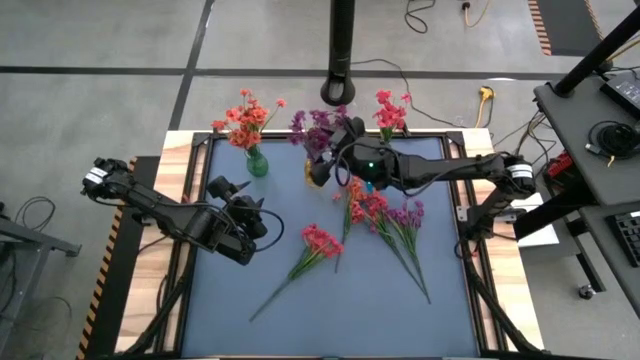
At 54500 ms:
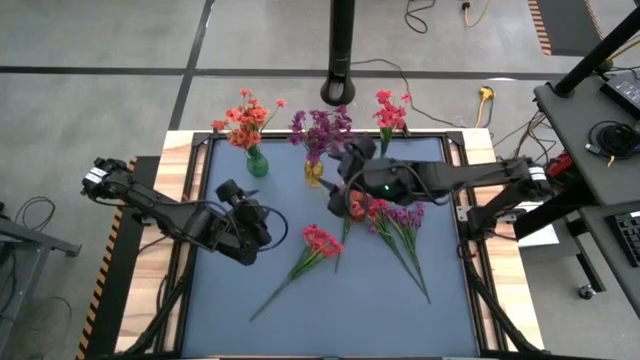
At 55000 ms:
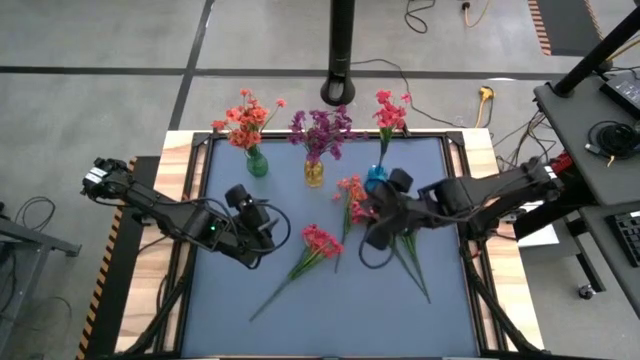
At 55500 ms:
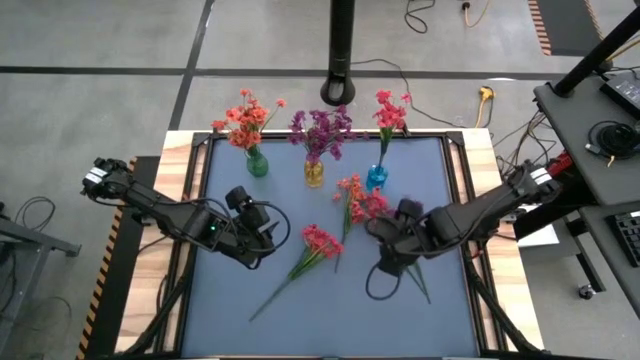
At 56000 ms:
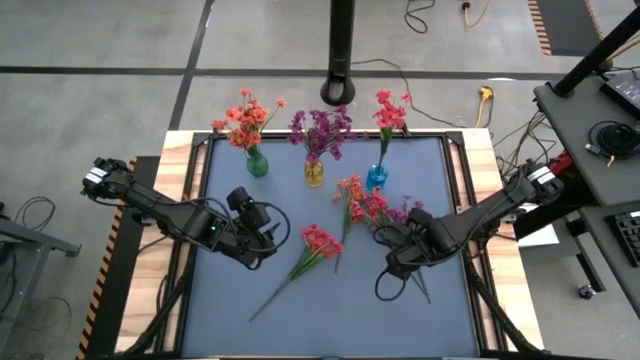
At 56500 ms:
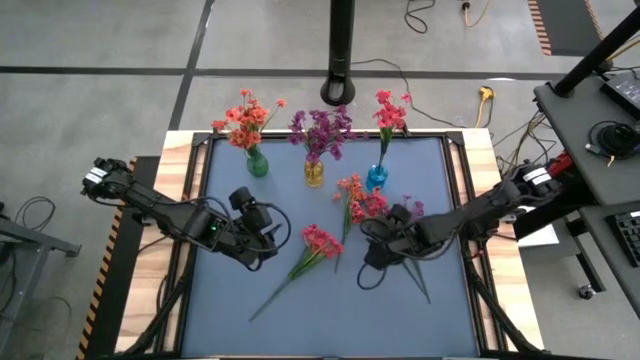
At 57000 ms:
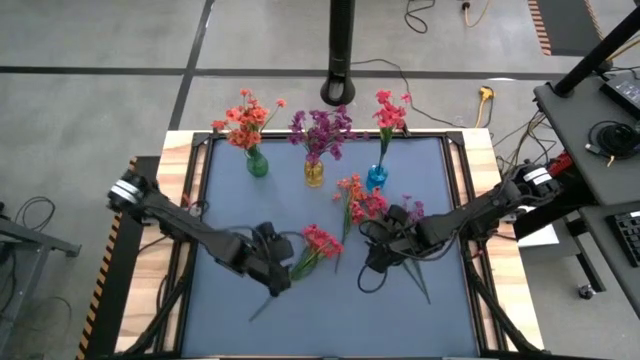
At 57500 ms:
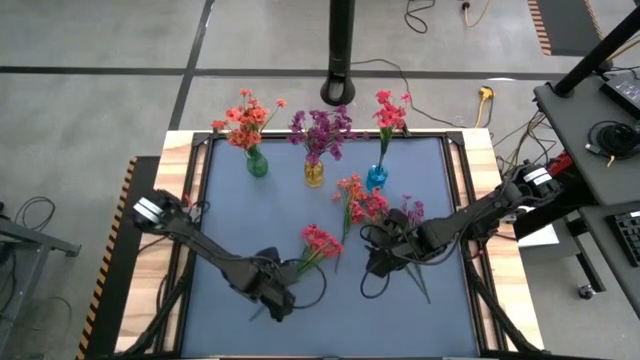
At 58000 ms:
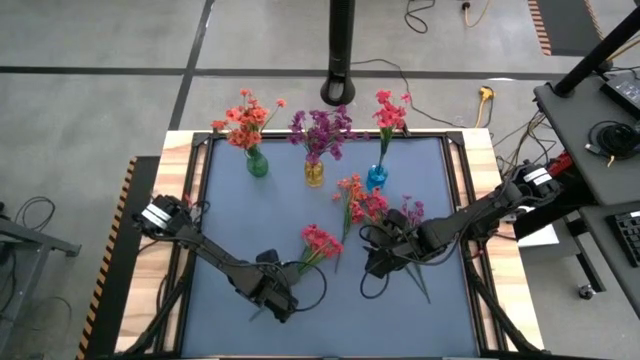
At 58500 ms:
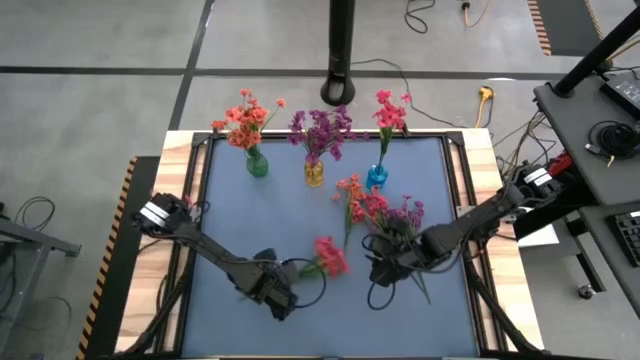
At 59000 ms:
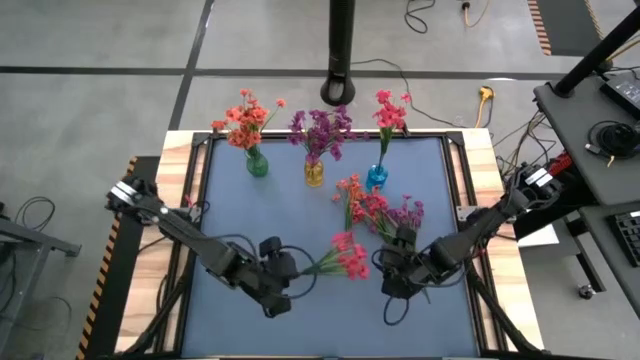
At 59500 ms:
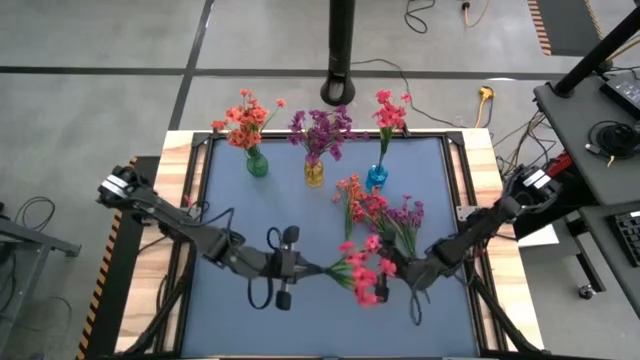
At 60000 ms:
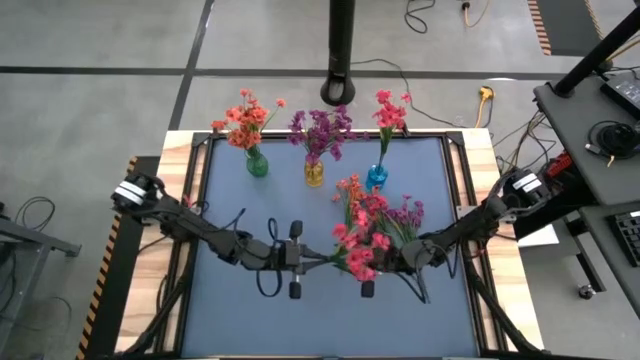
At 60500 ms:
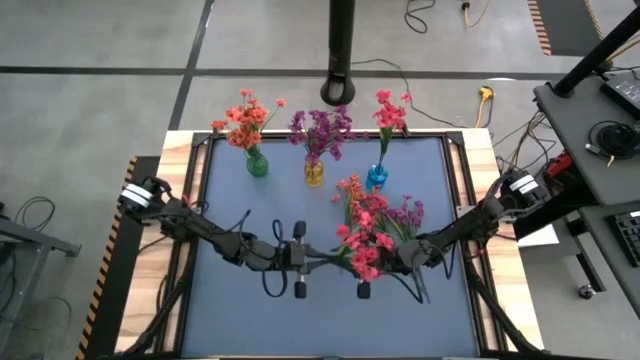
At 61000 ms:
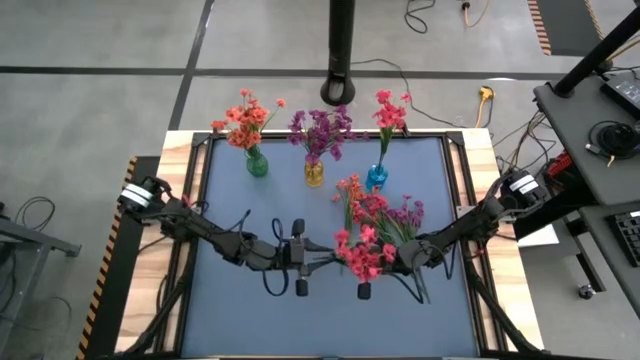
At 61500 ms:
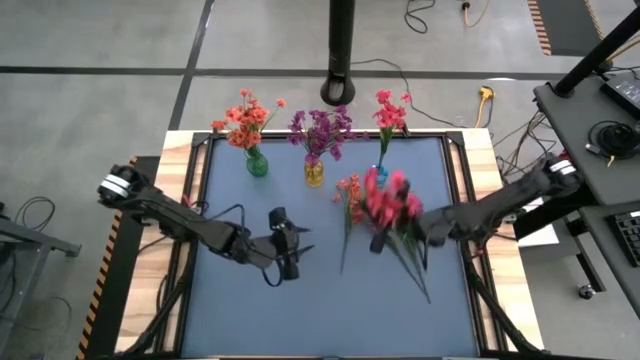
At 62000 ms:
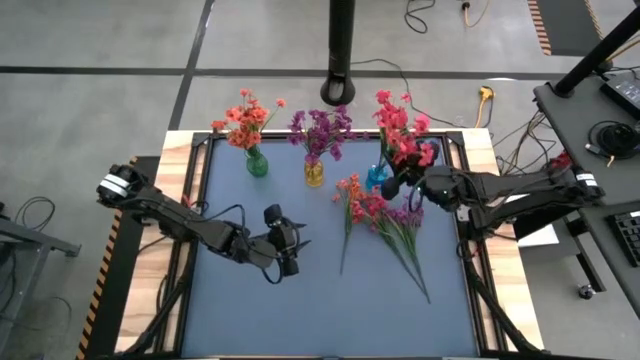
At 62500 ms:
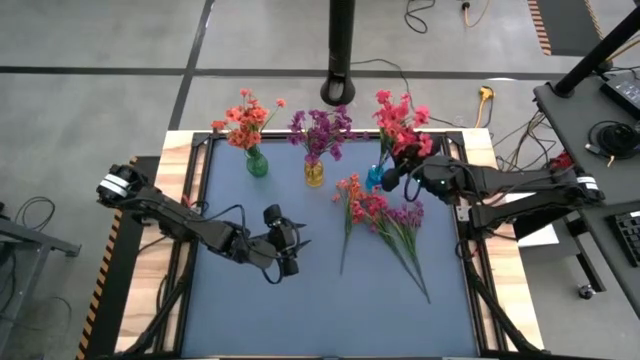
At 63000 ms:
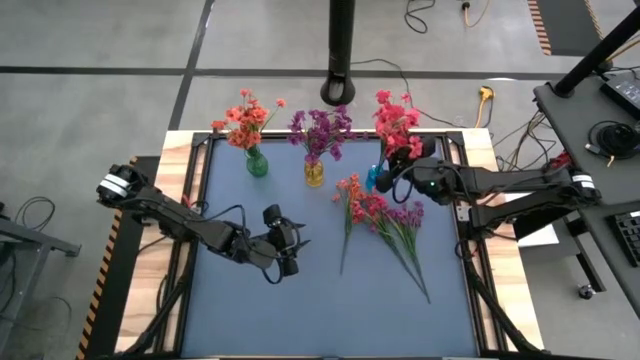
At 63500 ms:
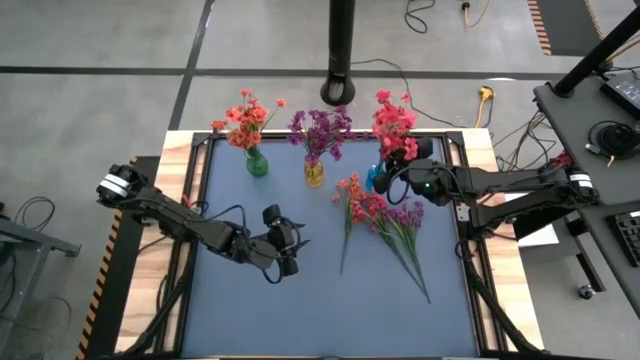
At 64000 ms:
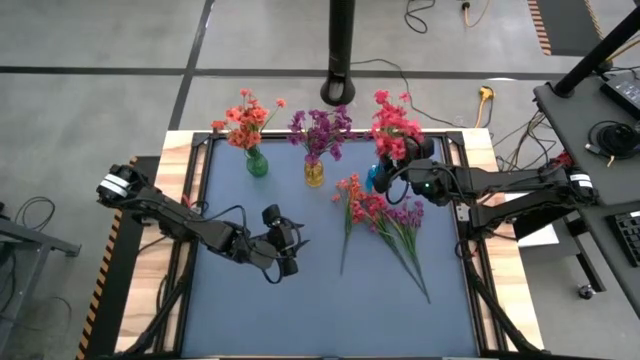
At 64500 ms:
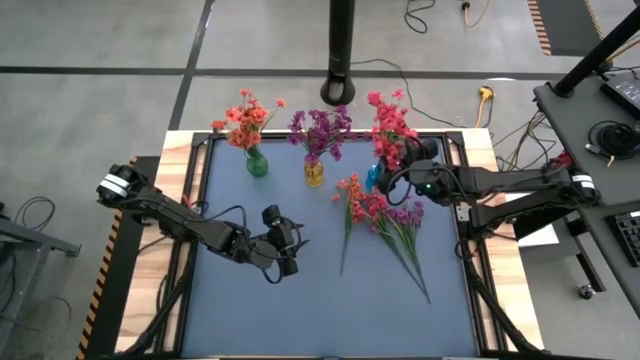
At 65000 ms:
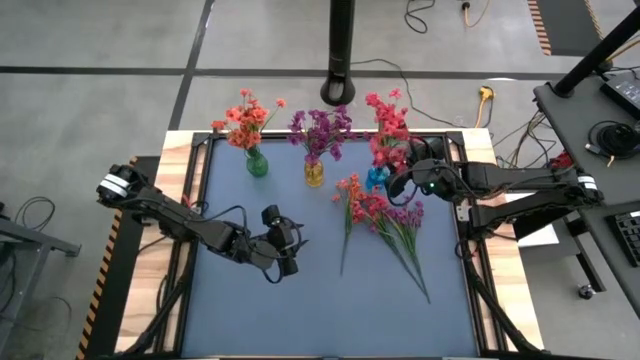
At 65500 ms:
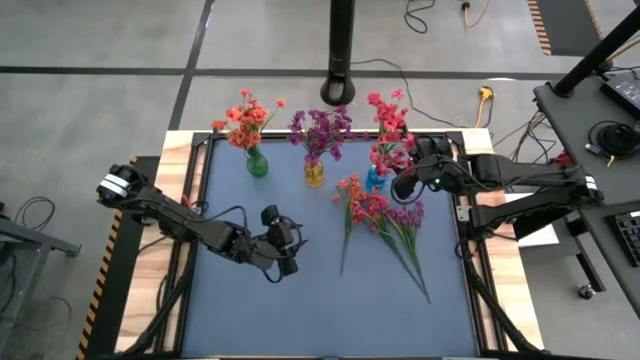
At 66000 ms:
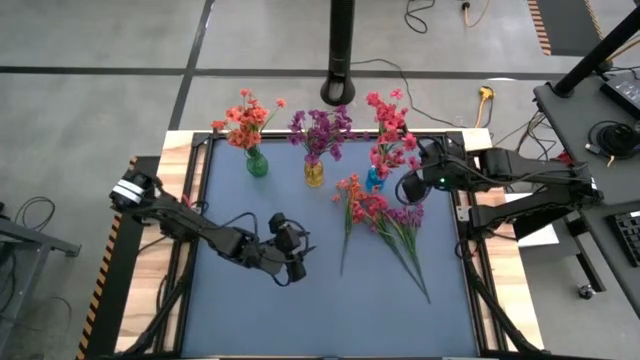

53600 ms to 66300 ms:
Task: Sort flowers into vase by color
Put the bottom pink flowers into the blue vase

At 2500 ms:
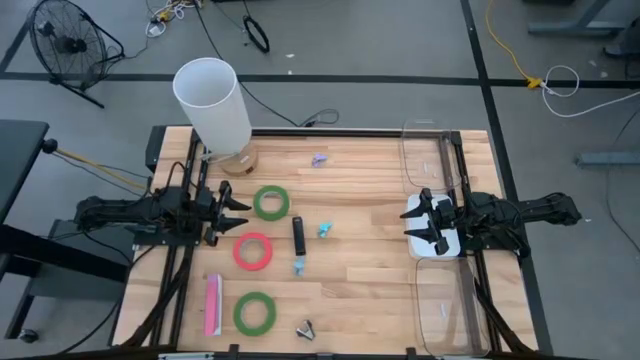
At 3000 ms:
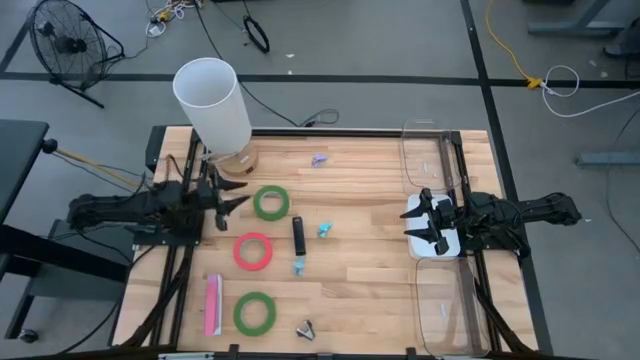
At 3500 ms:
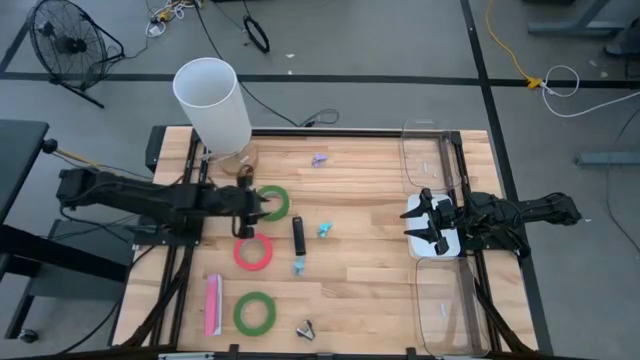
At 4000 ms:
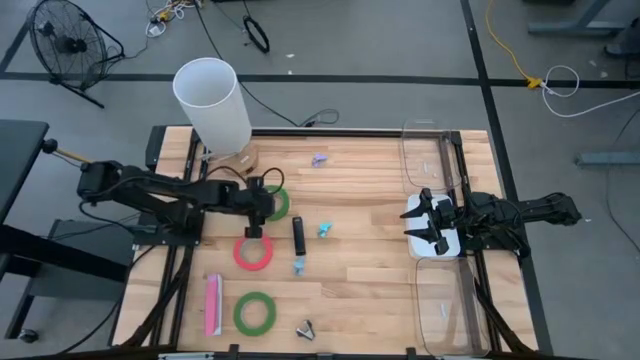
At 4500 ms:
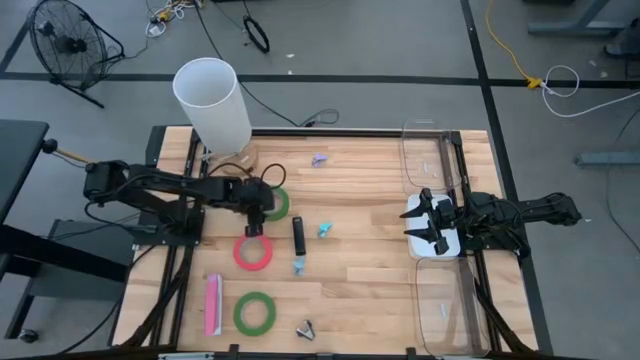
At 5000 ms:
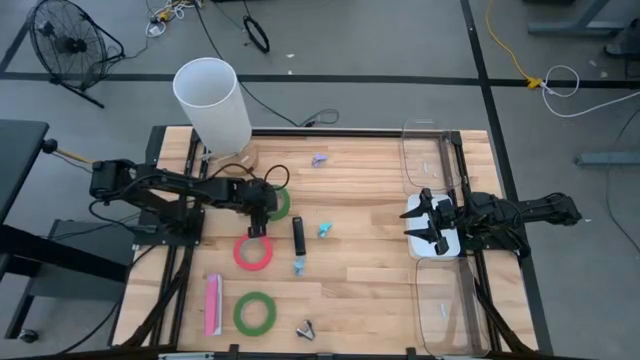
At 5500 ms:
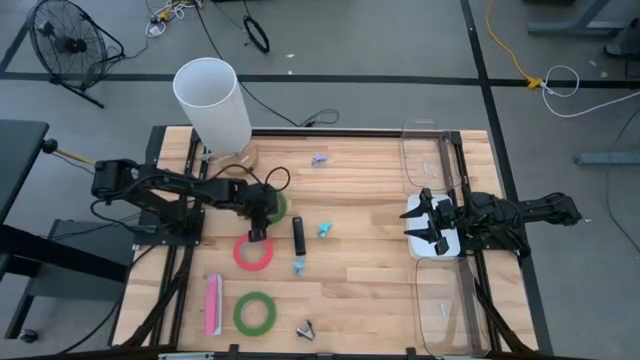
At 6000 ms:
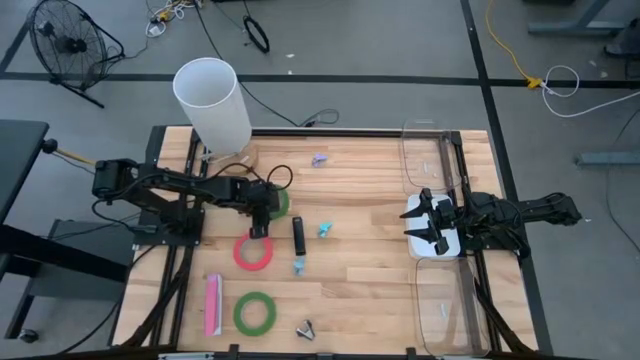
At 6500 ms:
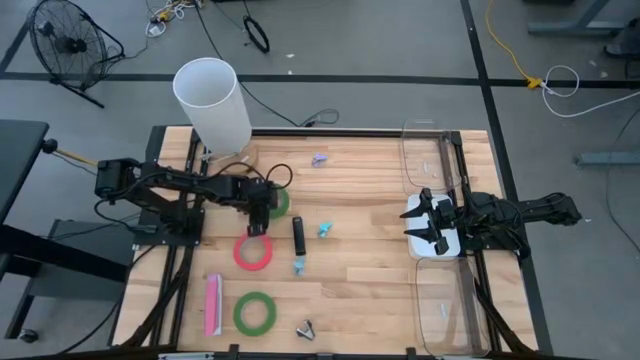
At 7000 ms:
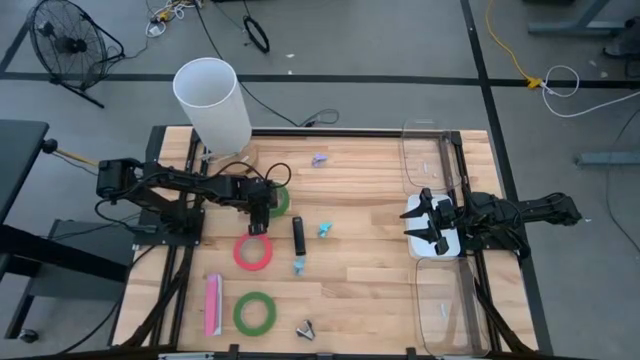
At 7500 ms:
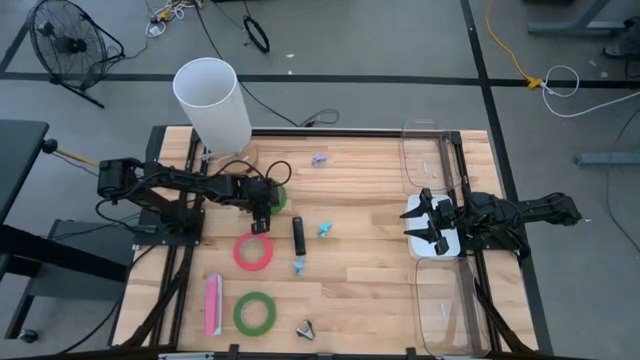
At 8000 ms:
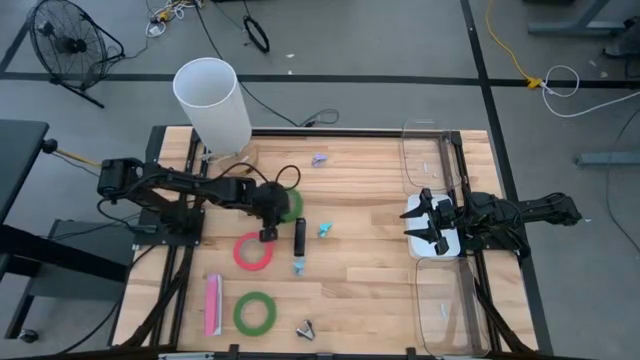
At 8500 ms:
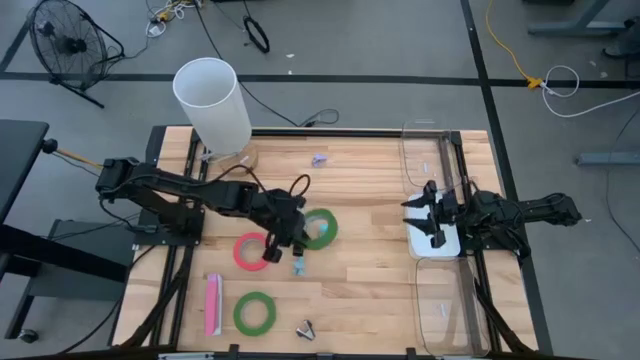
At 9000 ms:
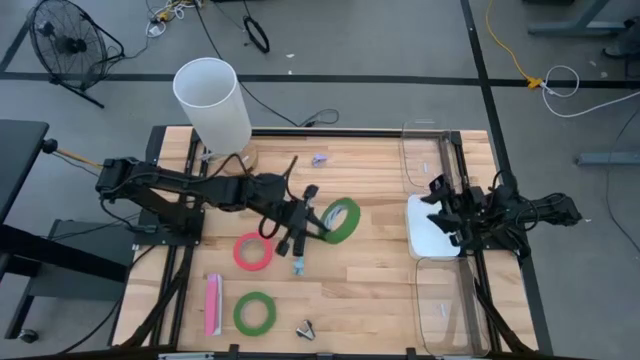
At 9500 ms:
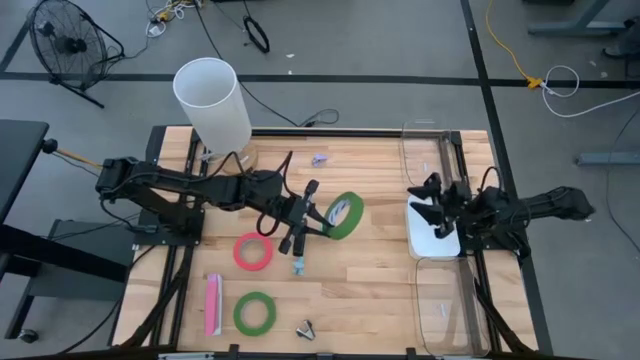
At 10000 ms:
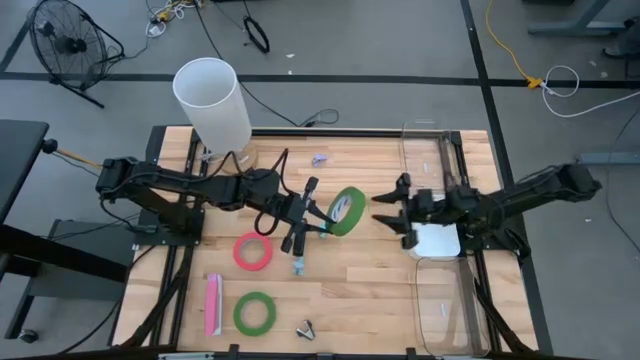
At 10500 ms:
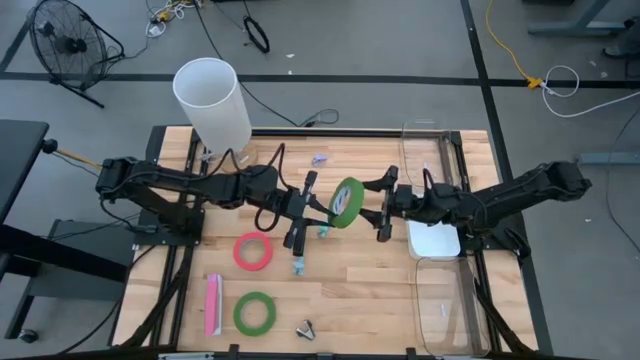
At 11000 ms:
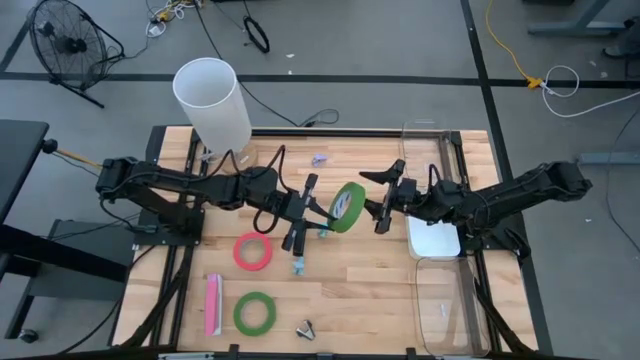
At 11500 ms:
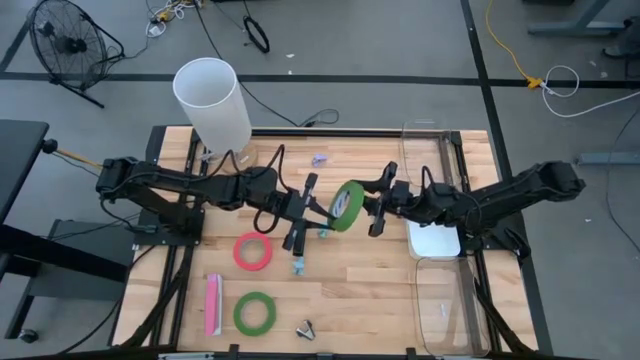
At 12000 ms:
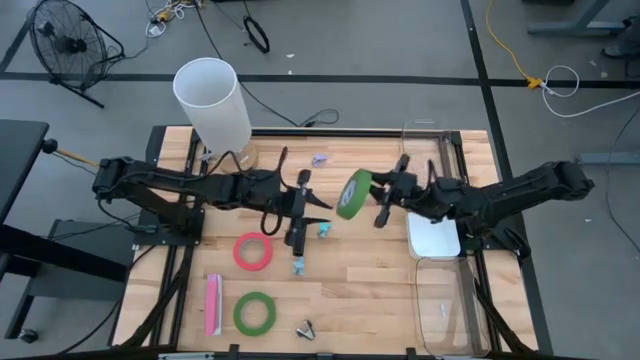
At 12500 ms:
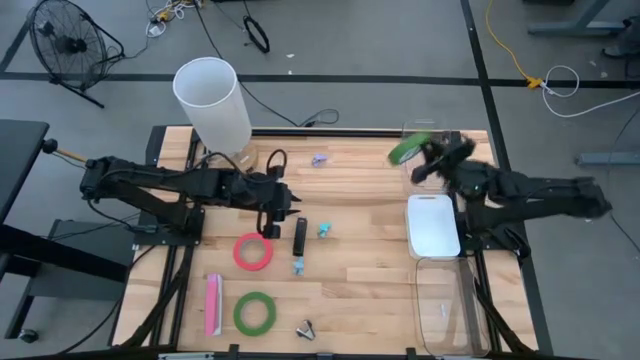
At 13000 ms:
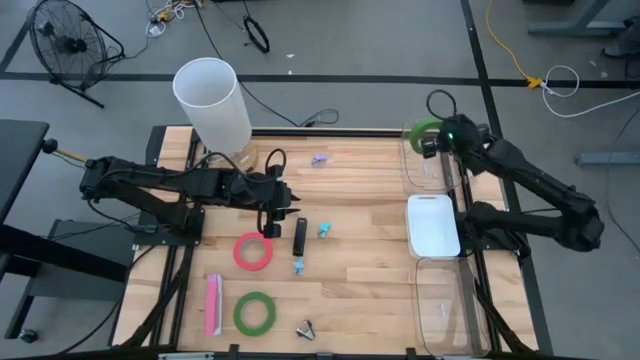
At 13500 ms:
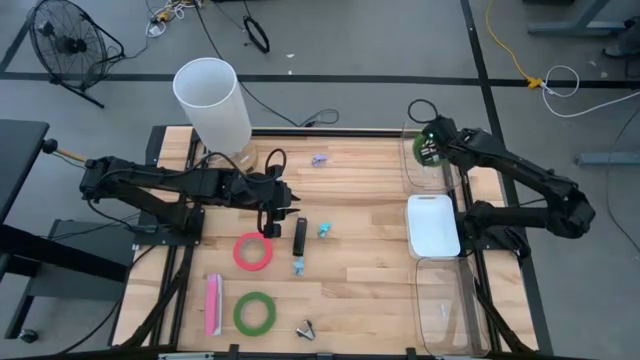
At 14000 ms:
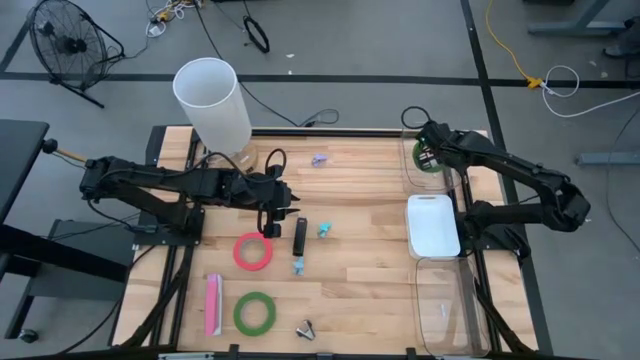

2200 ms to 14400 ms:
Task: Pick and place Stapler, Stapler remover, tape
Put the top green masking tape into the top transparent bin
